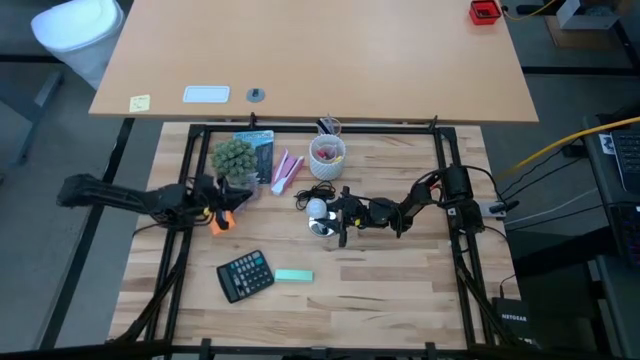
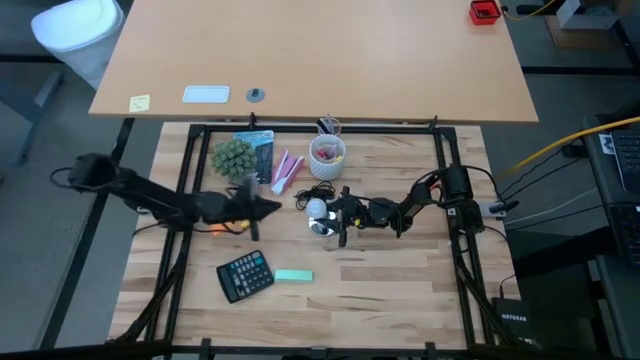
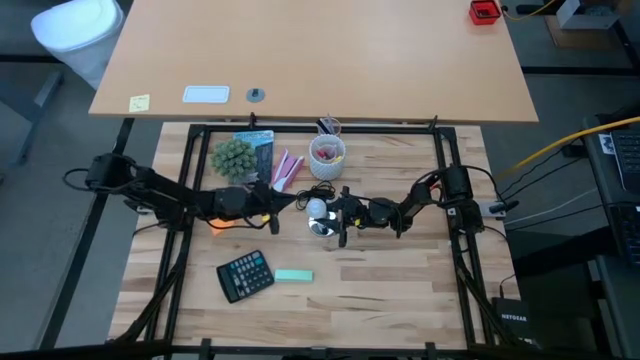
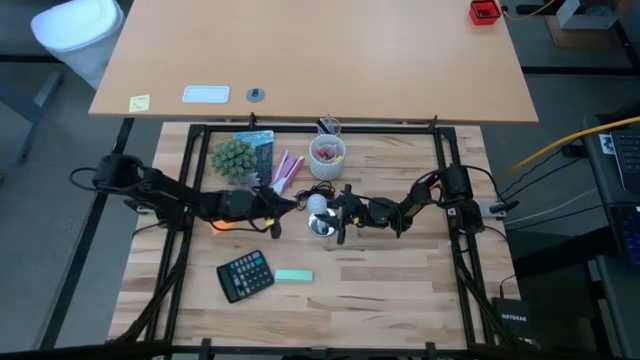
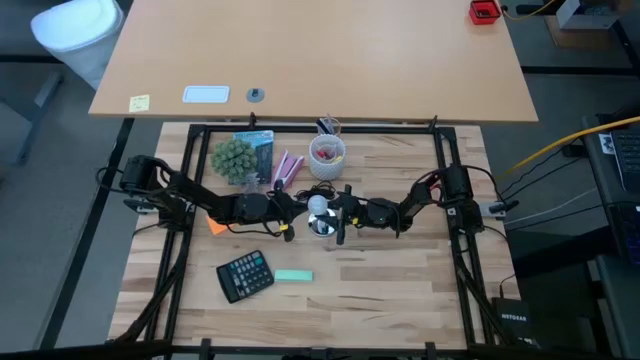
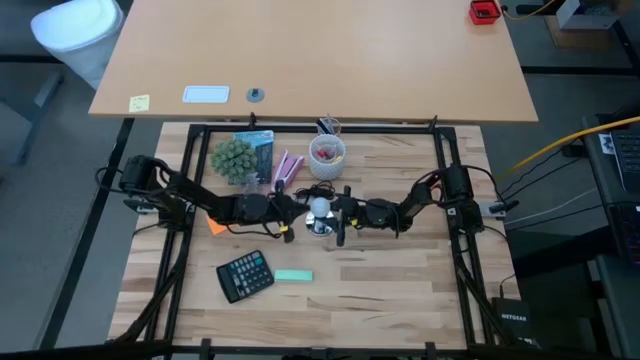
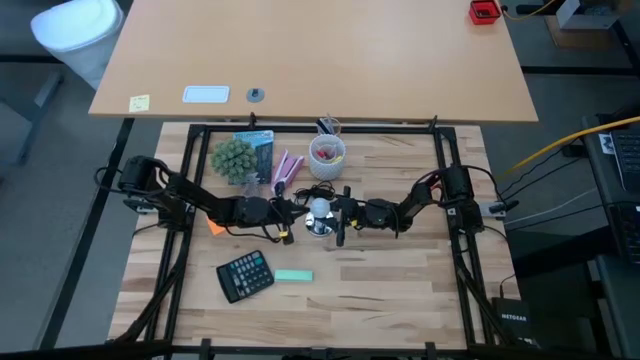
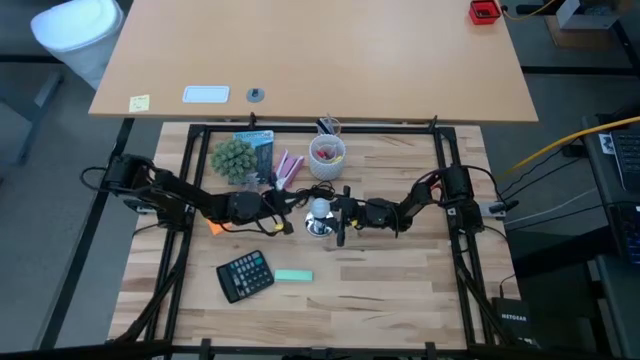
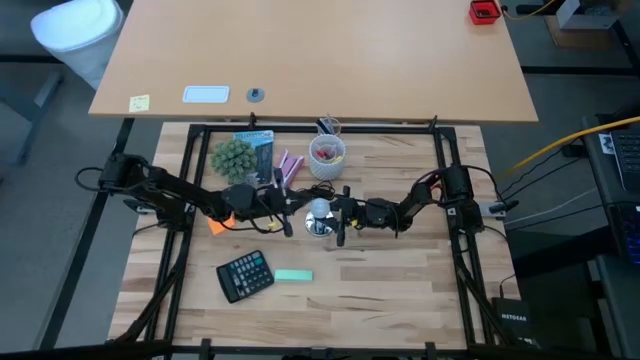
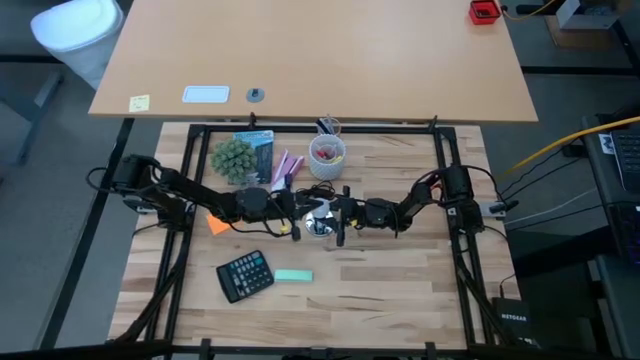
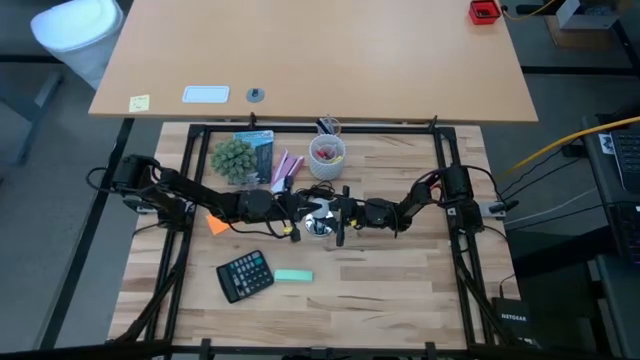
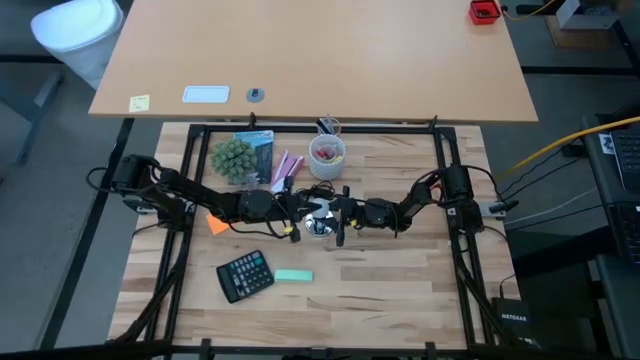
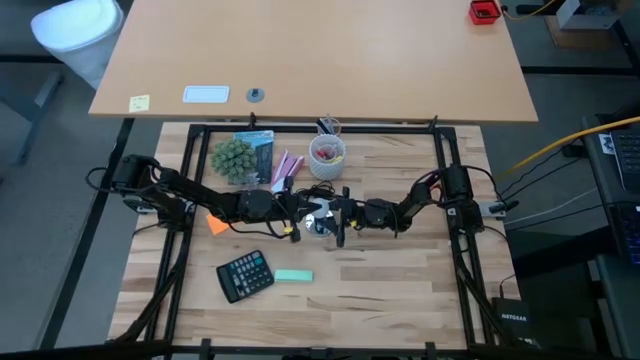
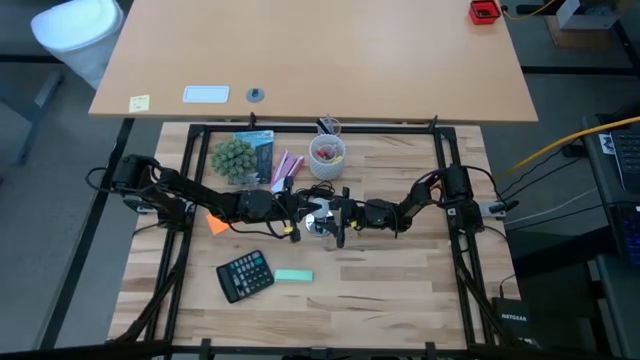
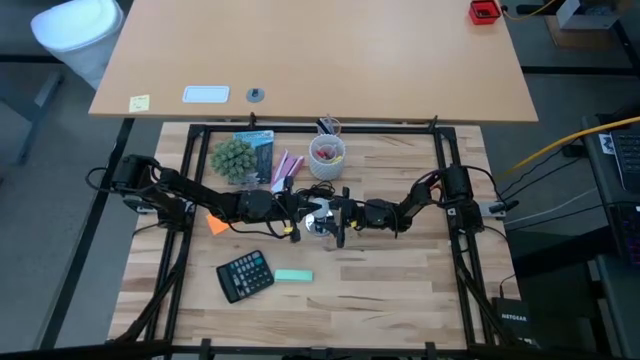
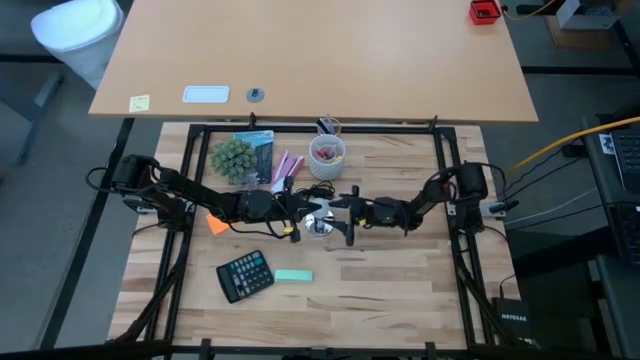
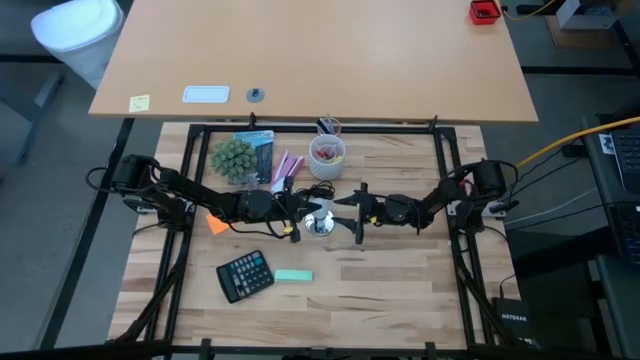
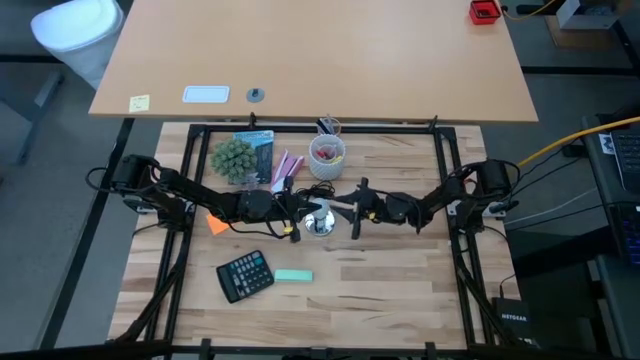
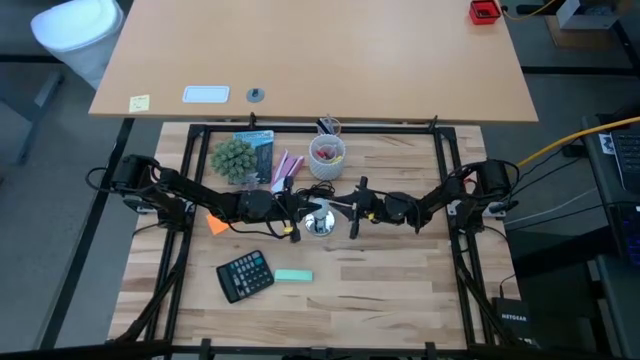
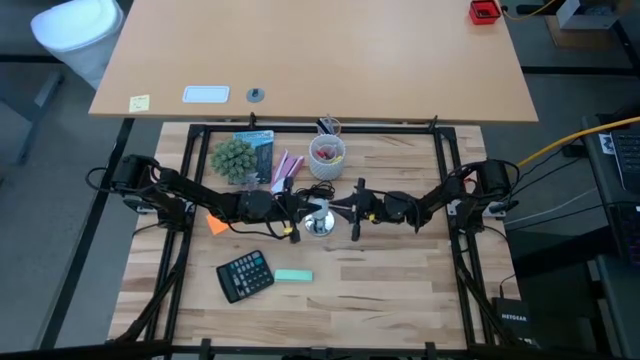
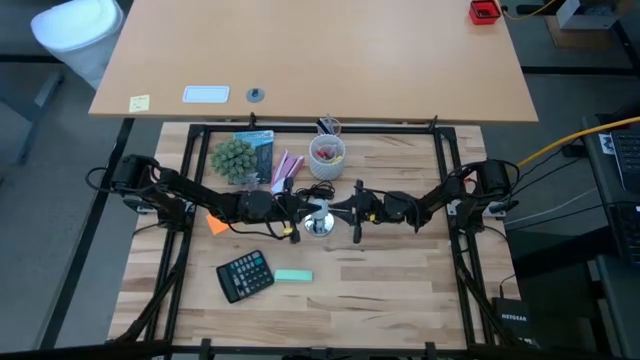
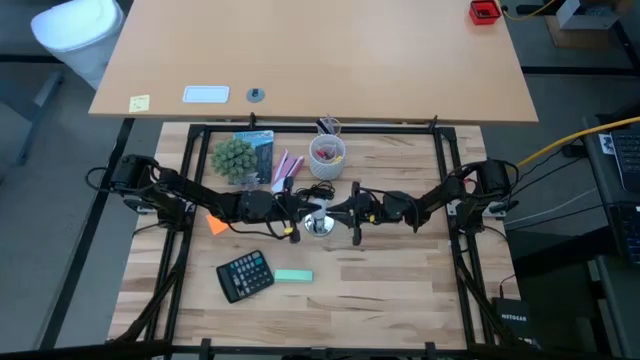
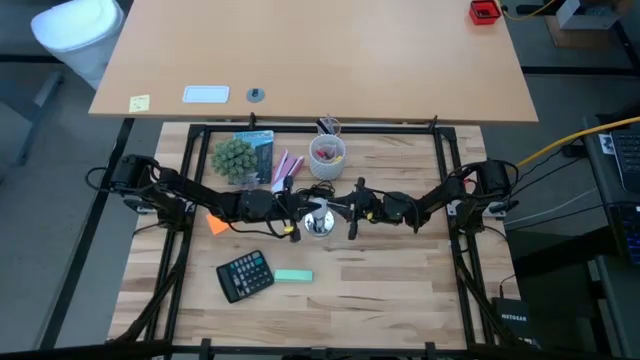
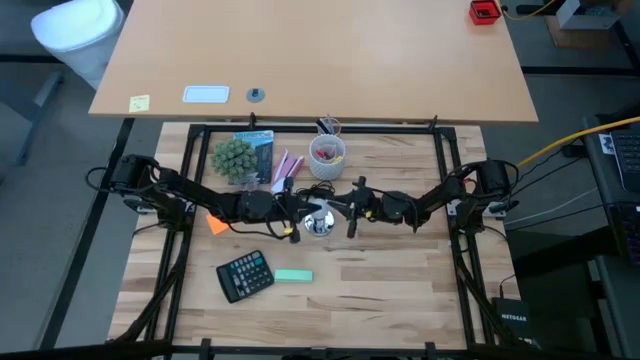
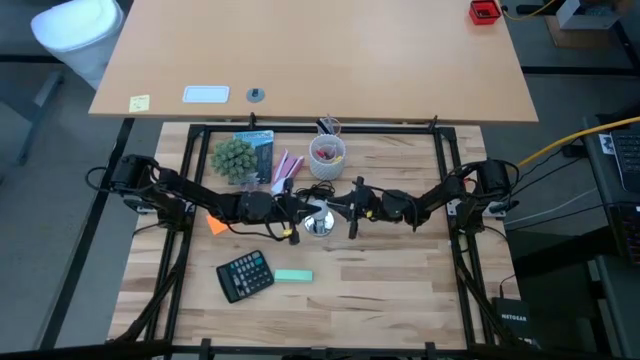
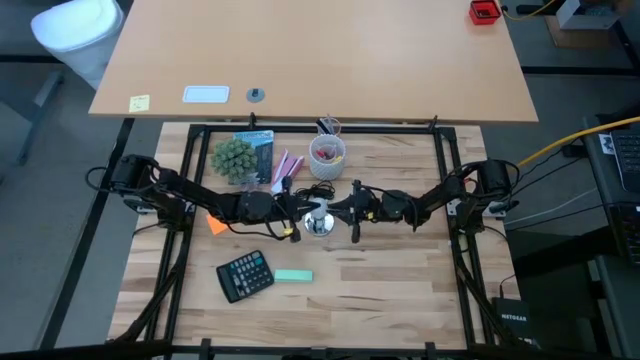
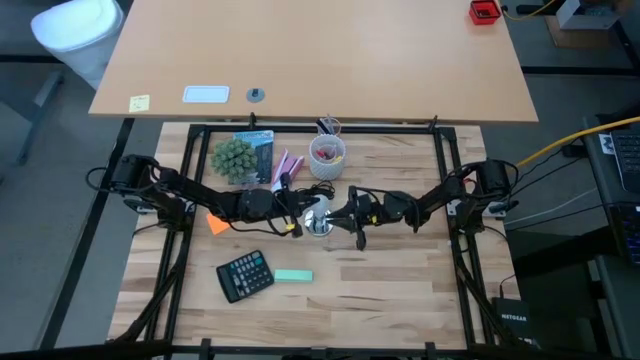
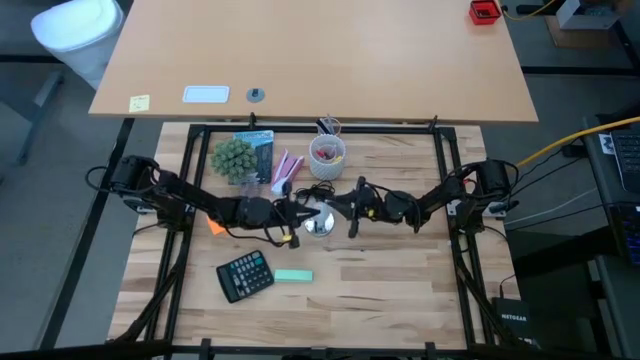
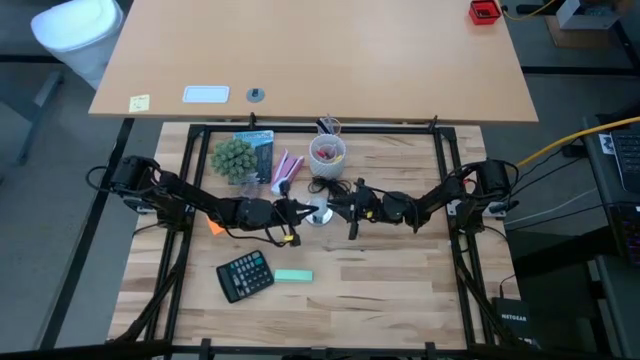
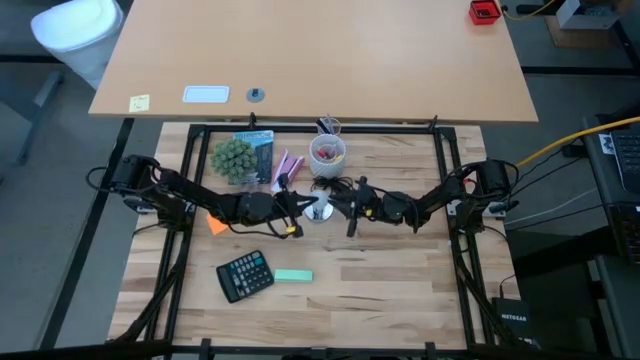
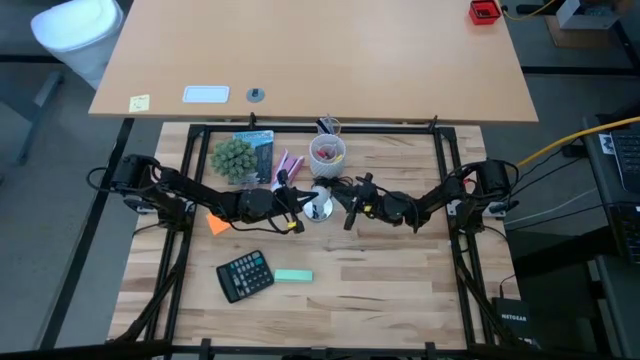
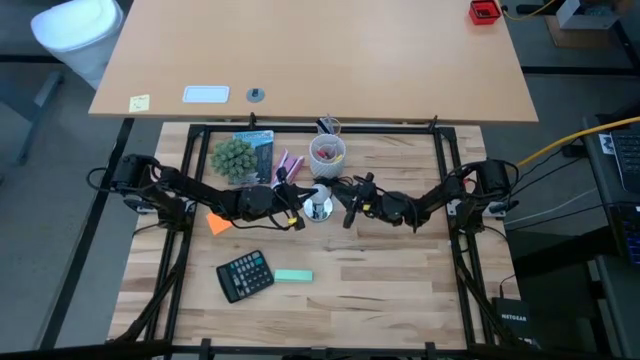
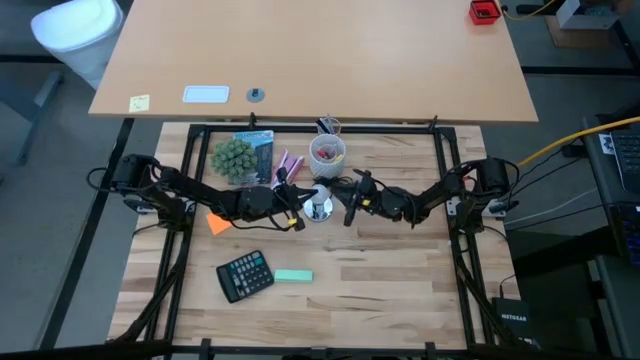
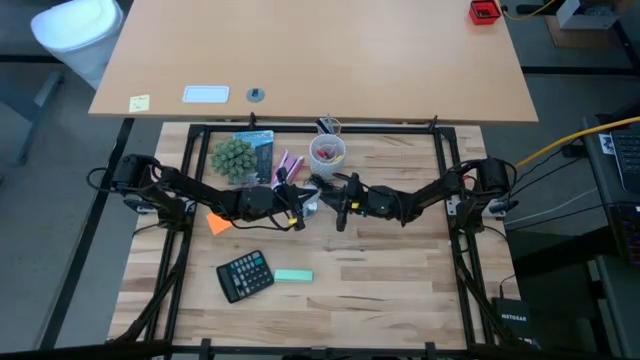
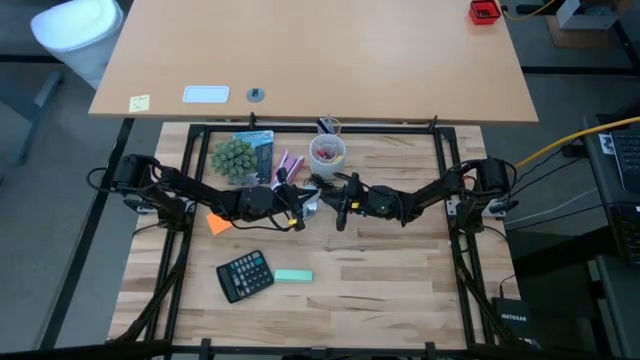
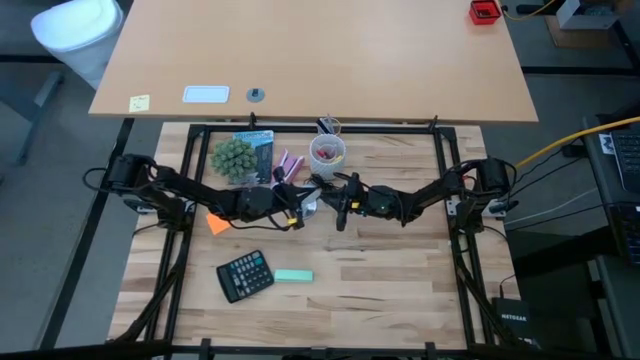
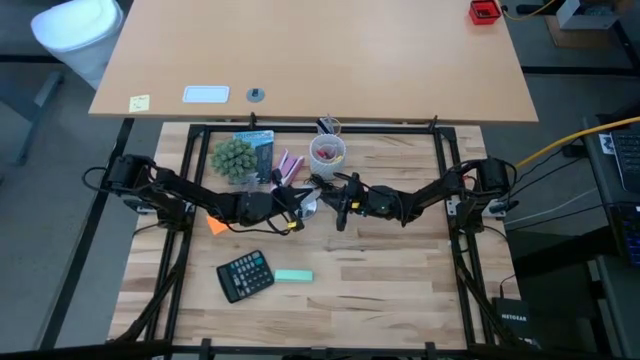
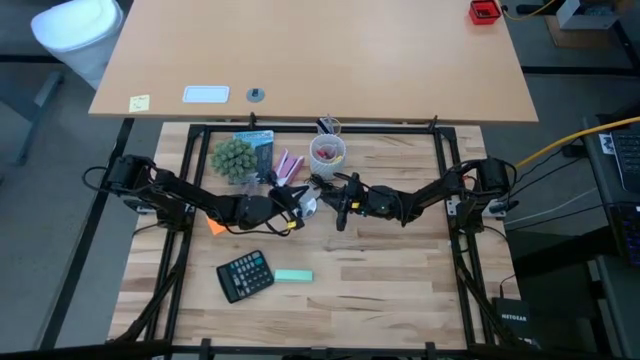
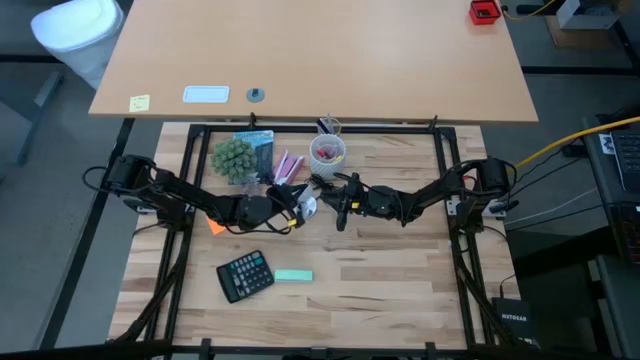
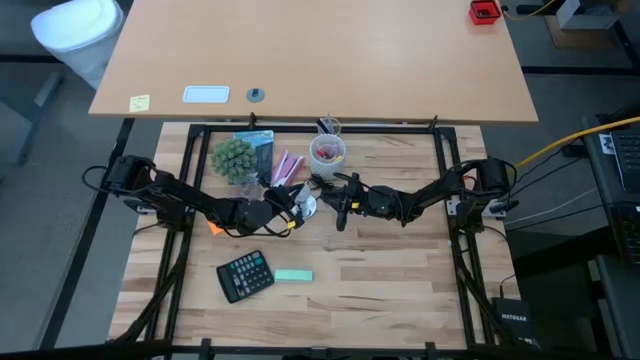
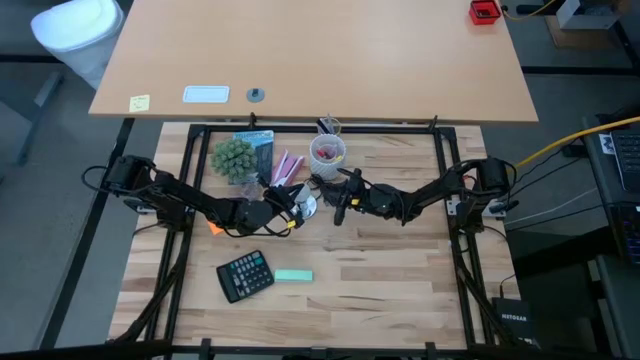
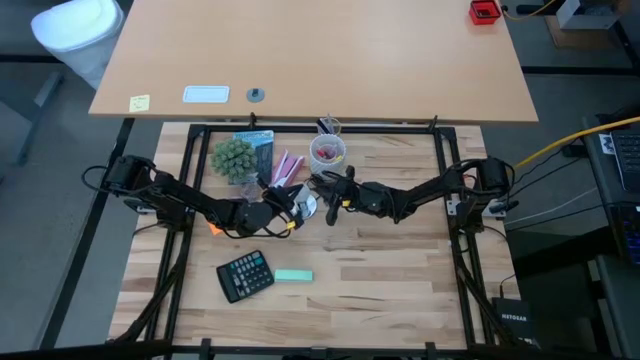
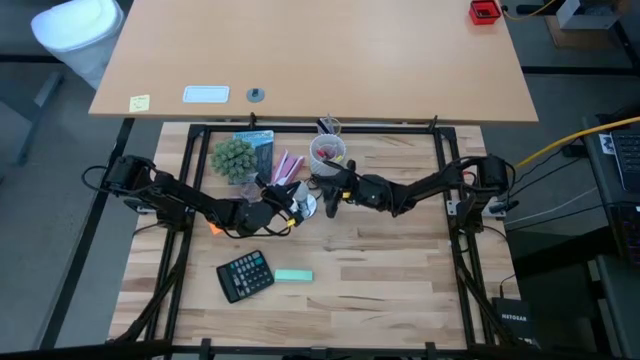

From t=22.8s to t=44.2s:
Task: Screw lightbulb
Insert the lightbulb into the lamp
